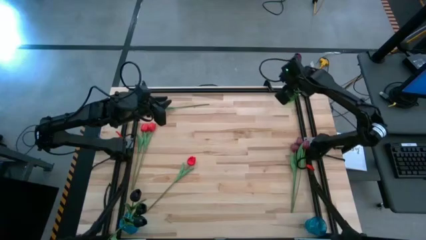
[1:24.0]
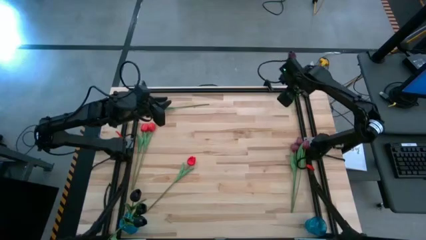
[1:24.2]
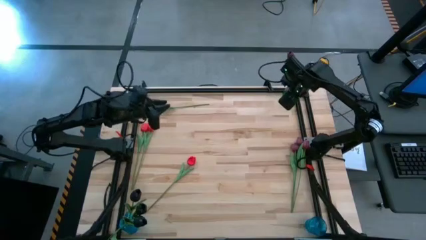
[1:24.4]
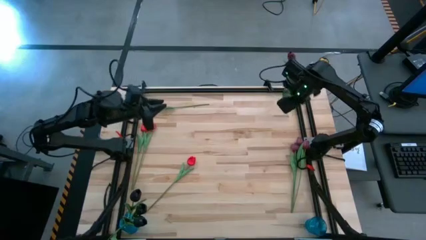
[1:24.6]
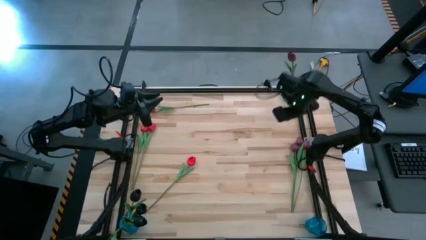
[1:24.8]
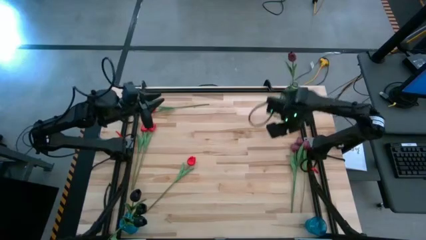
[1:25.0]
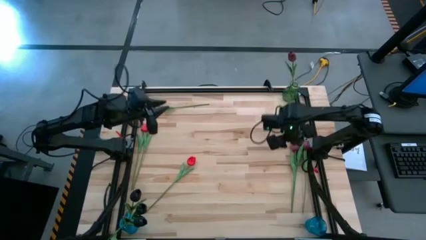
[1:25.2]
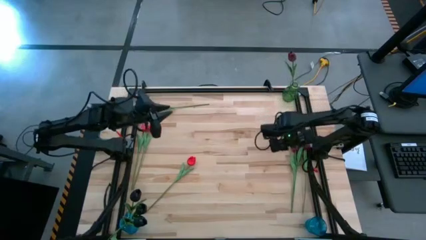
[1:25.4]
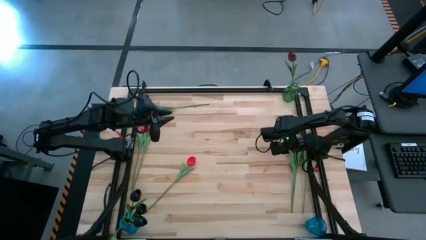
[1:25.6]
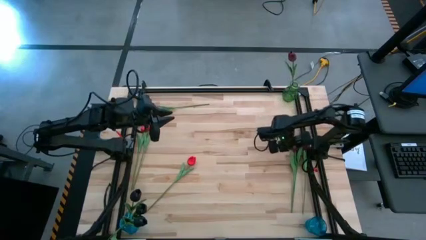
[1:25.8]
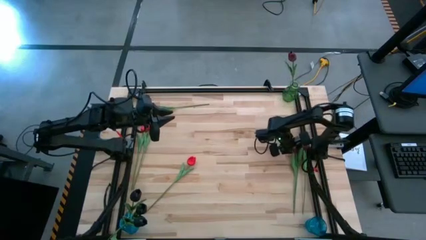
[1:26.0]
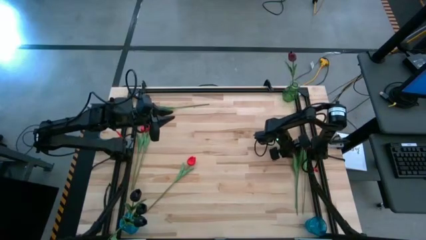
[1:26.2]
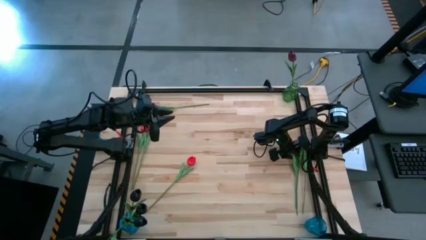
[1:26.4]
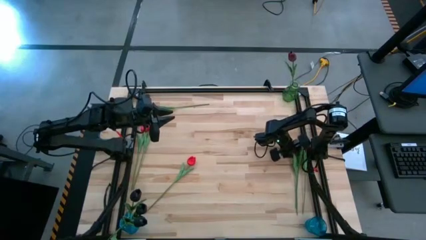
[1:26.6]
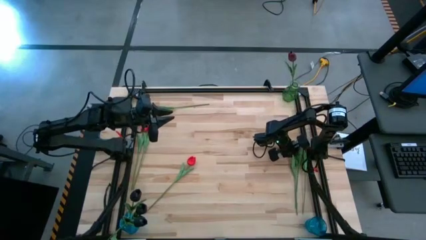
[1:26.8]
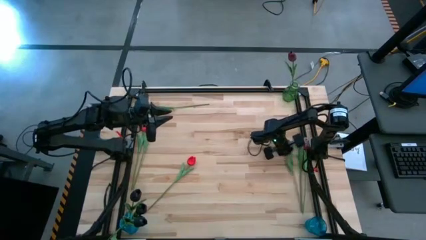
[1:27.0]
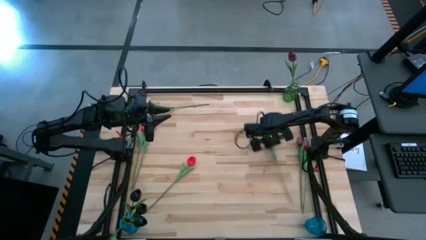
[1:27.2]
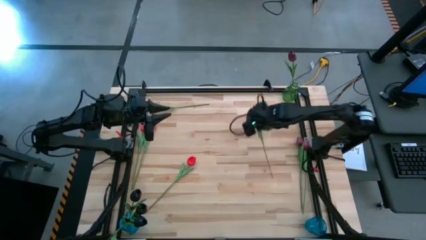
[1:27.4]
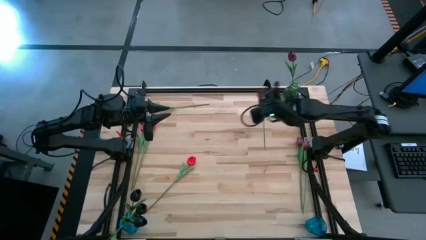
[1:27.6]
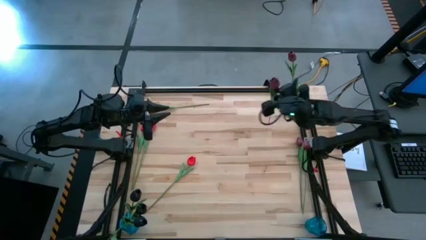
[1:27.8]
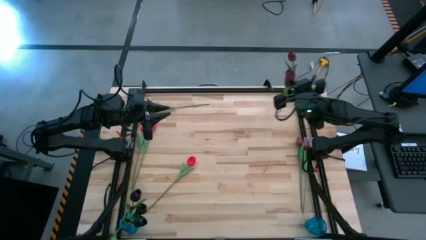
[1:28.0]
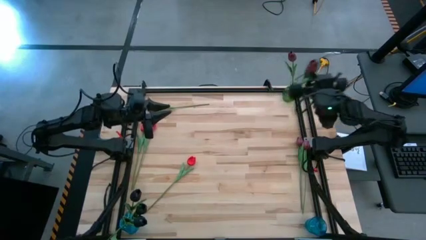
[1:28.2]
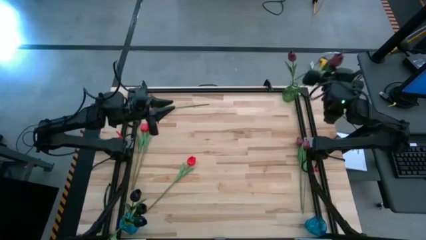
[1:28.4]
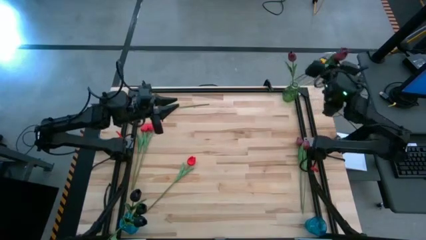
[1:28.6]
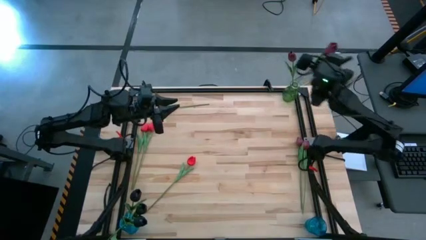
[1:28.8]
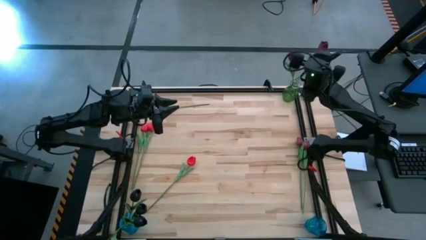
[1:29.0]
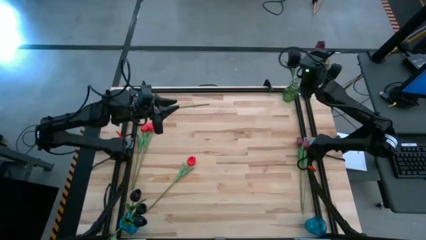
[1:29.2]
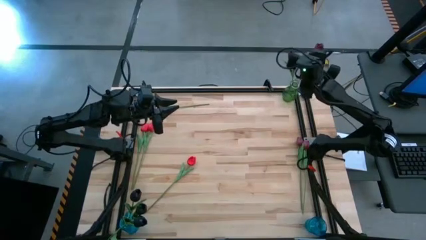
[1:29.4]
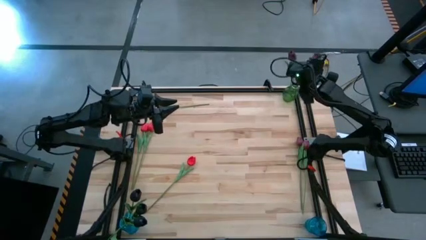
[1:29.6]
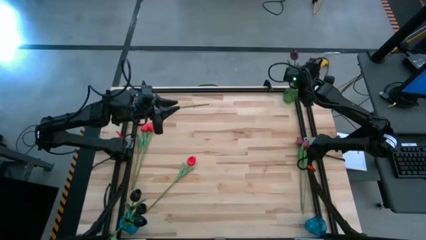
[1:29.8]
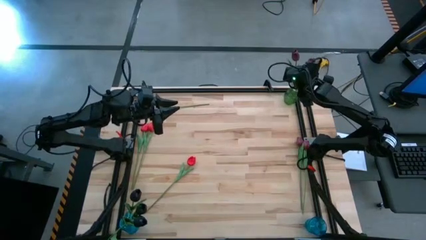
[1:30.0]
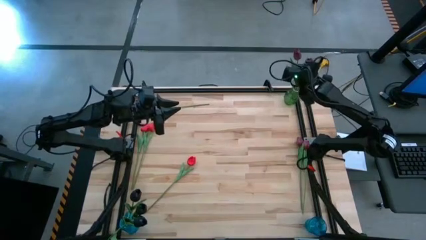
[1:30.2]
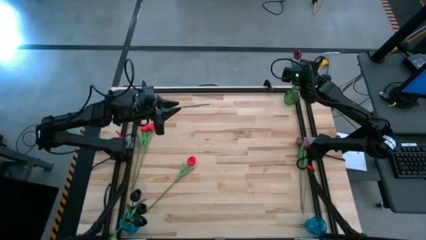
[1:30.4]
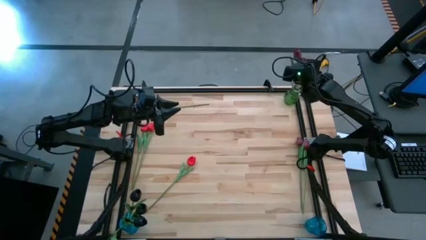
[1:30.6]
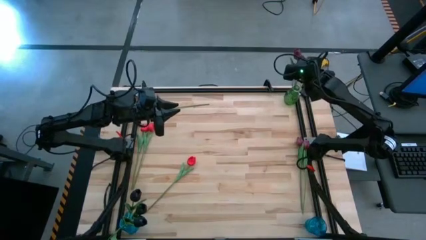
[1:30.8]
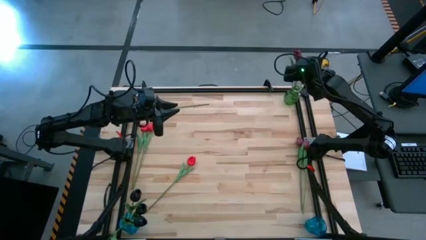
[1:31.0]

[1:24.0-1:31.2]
Task: Sort flowers into vase by color
Put the dark red tulip into the green vase

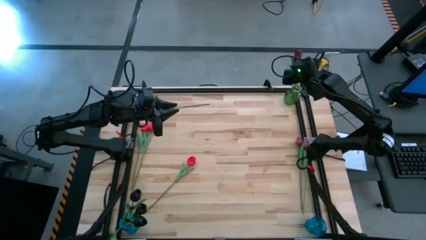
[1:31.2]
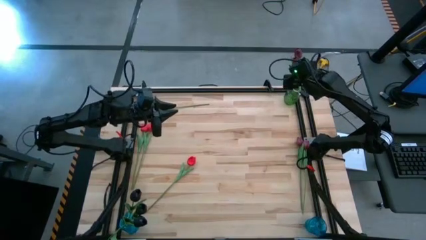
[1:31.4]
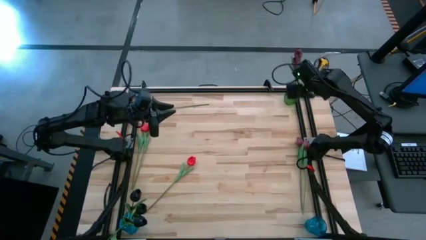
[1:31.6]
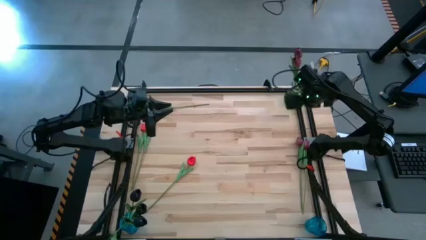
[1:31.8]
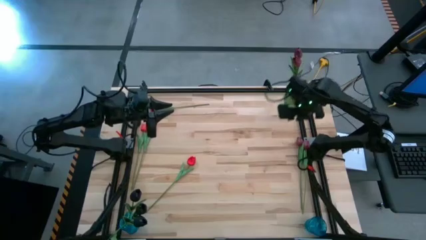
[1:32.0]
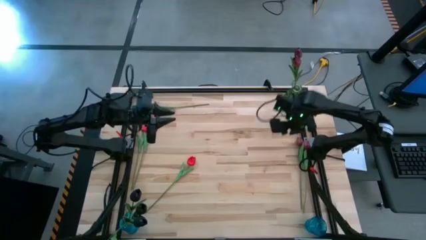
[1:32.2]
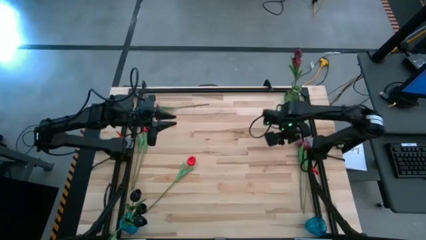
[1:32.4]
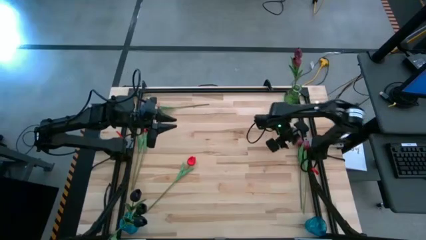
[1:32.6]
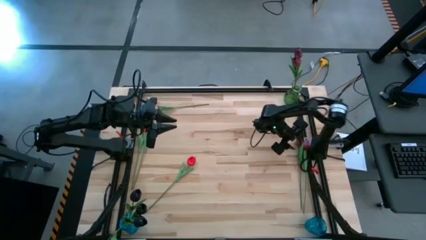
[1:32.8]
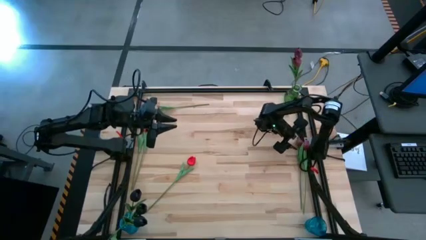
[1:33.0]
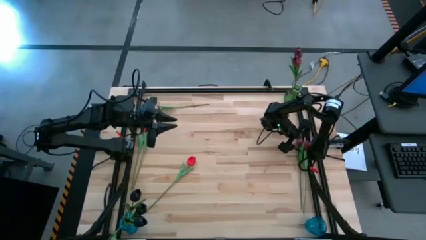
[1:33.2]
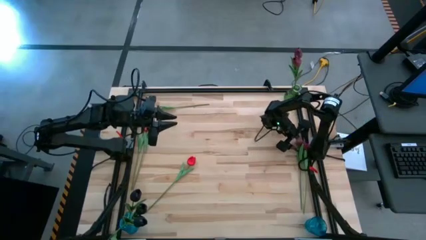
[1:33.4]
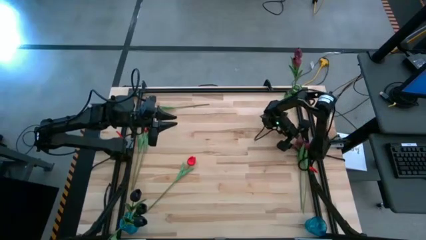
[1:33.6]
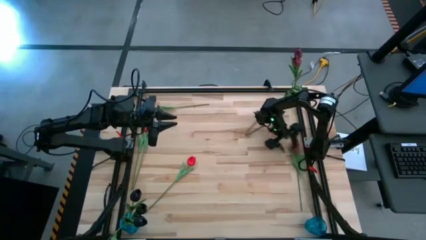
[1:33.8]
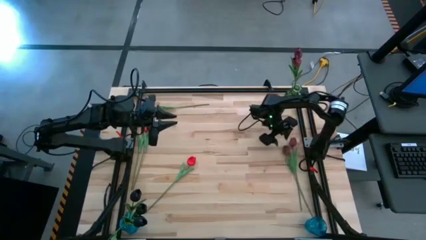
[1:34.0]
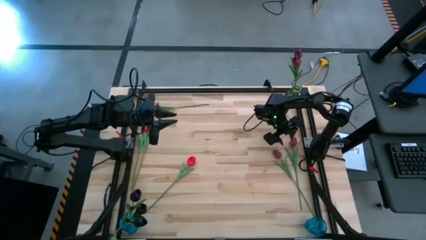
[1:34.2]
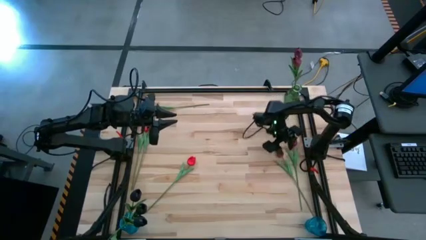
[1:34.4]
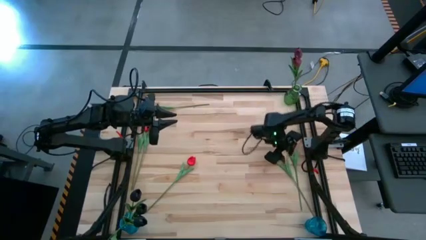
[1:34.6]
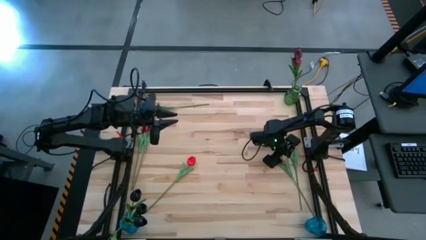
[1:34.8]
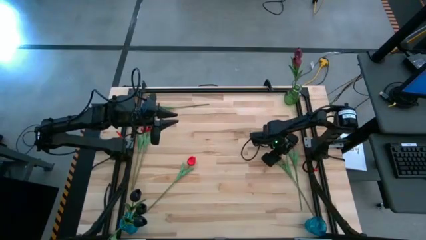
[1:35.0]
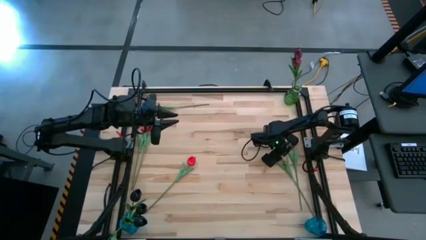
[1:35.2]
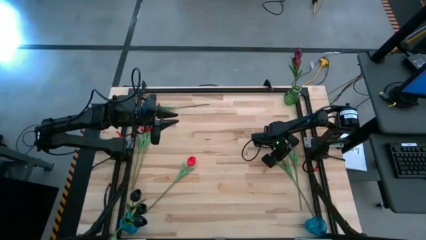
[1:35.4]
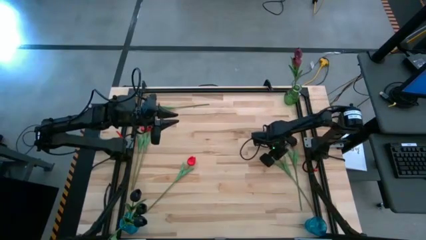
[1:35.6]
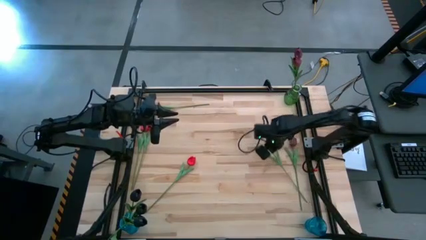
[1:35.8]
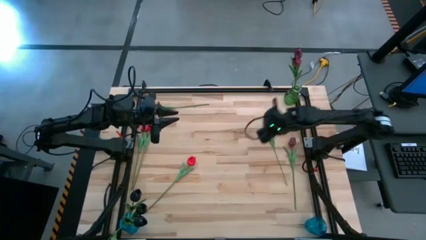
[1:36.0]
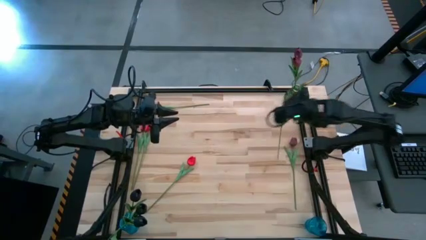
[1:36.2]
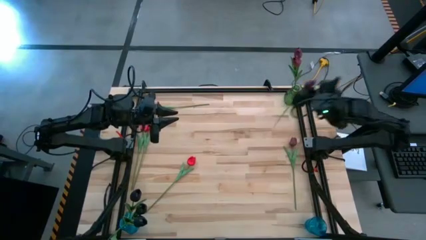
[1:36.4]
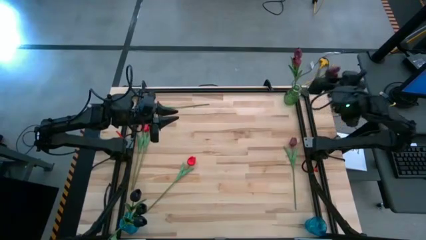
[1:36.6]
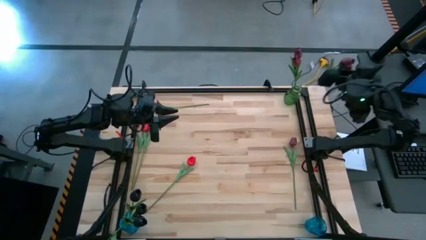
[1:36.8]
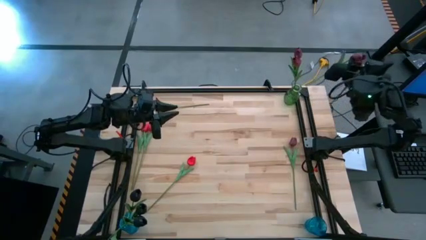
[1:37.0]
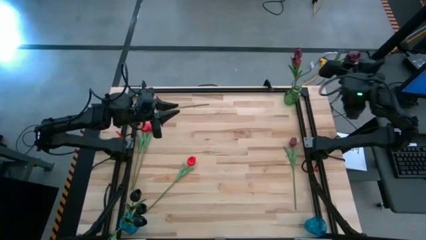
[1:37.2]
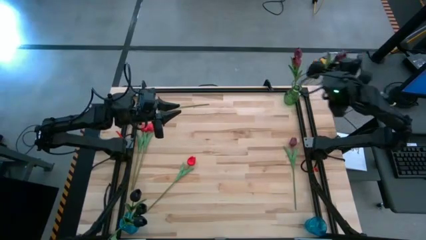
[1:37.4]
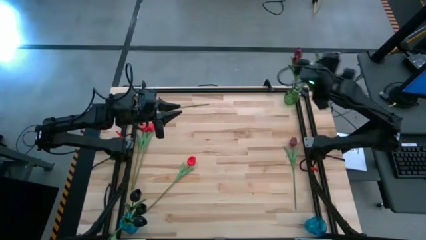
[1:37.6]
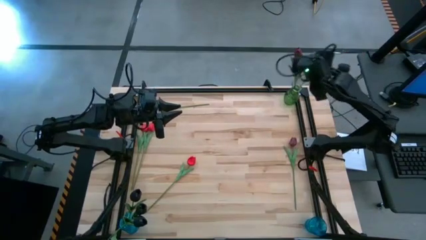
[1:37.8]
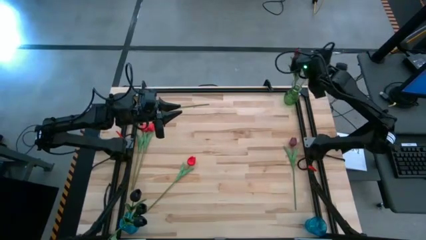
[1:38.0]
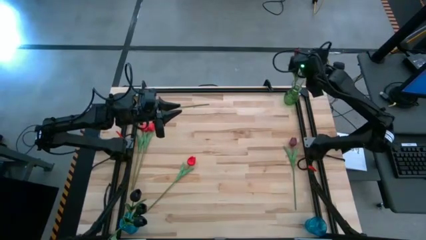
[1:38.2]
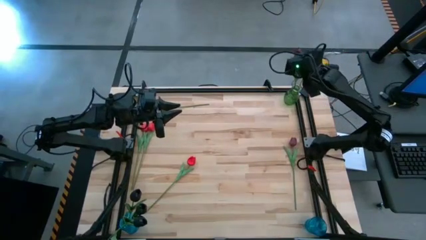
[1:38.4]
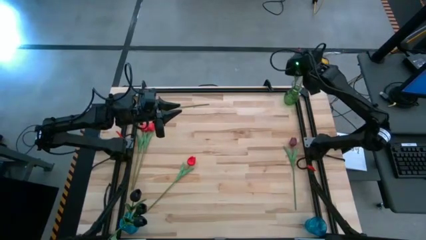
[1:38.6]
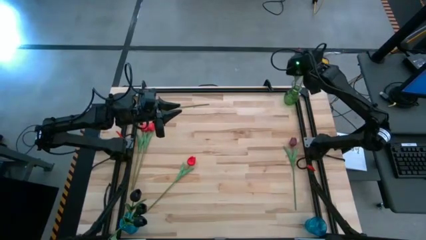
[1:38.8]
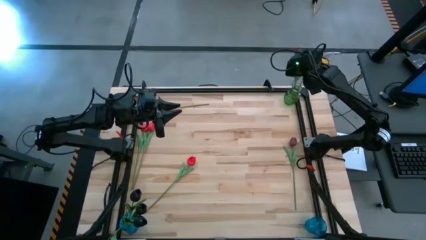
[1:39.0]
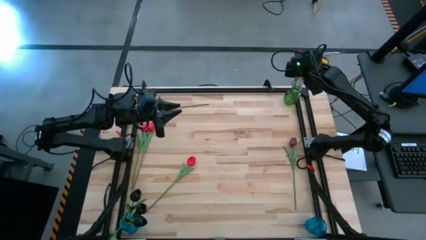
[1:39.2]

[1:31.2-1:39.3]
Put the dark red tulip into the green vase

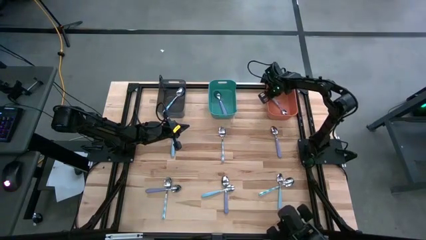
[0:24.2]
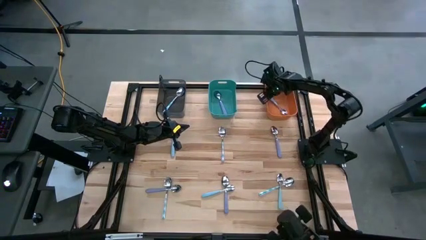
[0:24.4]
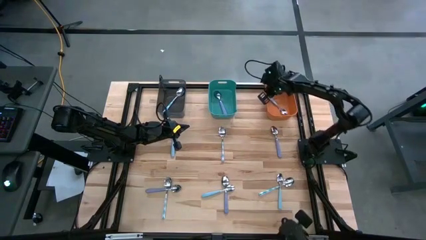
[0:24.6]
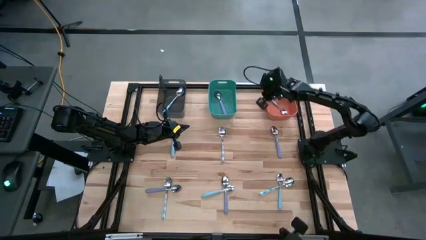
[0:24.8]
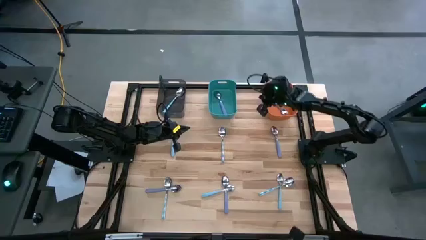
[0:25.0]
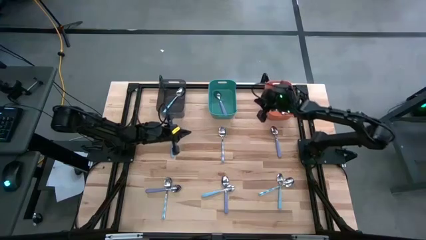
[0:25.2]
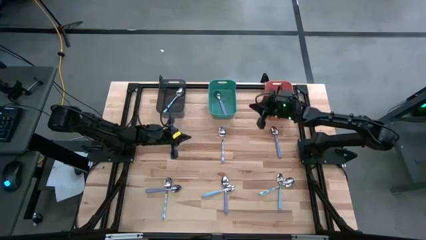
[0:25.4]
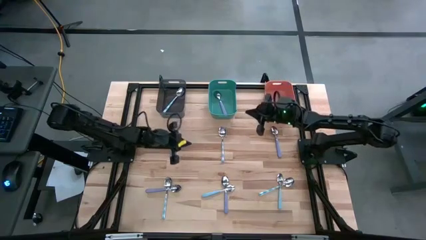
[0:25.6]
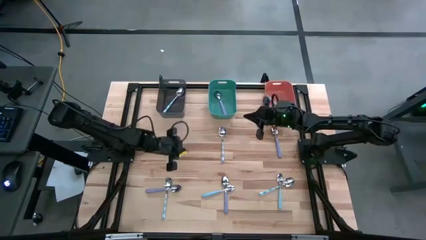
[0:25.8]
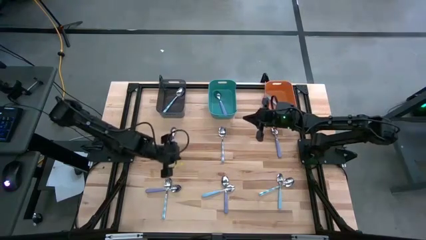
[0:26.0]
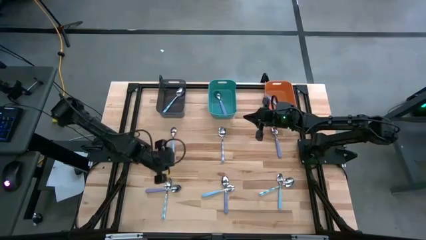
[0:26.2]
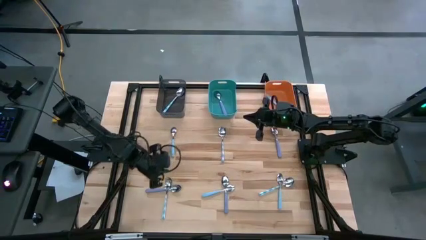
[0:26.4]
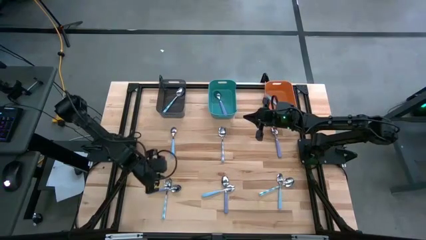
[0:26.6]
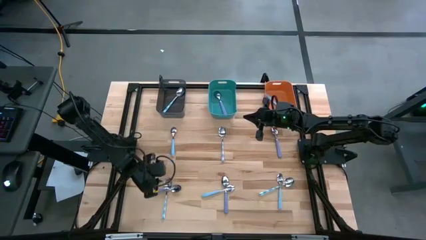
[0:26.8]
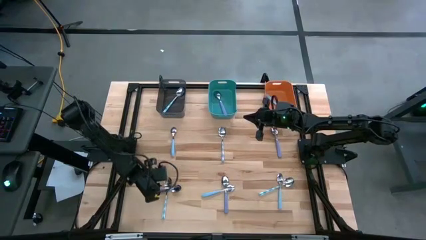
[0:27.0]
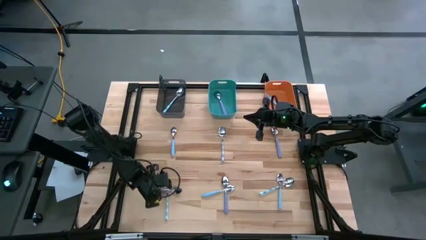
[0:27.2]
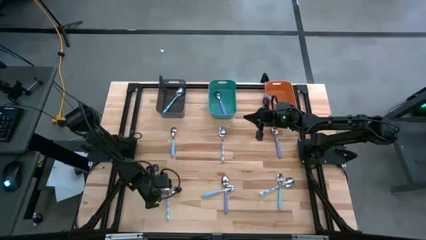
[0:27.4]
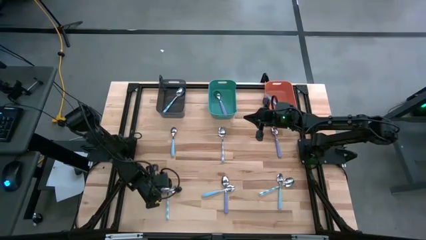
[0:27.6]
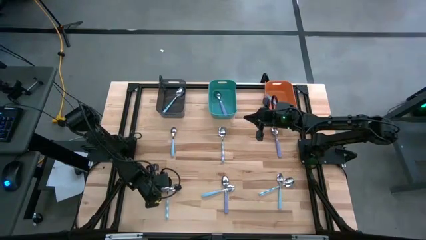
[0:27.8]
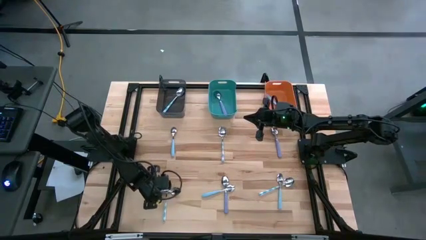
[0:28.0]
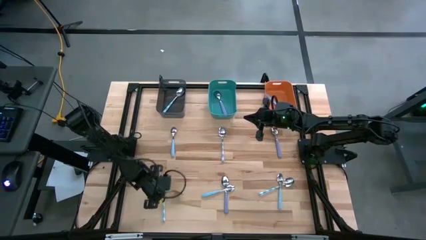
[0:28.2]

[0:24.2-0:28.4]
Task: Sort silverware by color (type)
Put the bottom left purple spoon into the green bin
